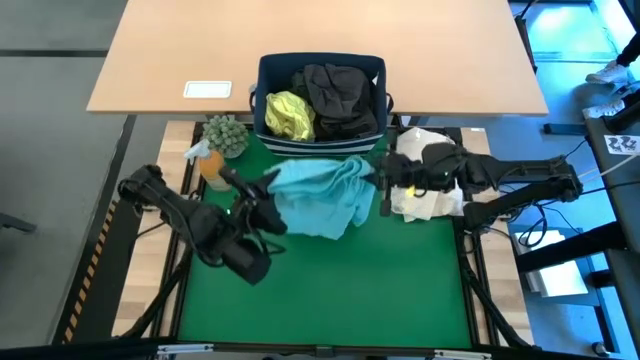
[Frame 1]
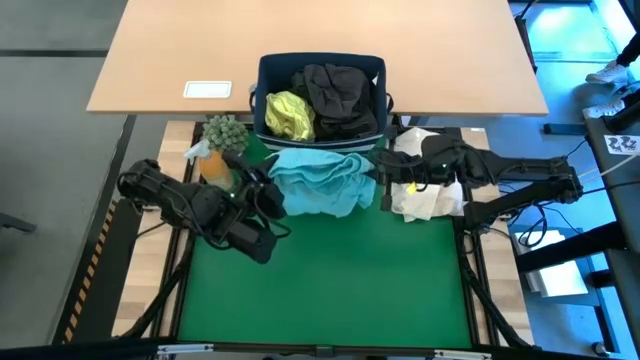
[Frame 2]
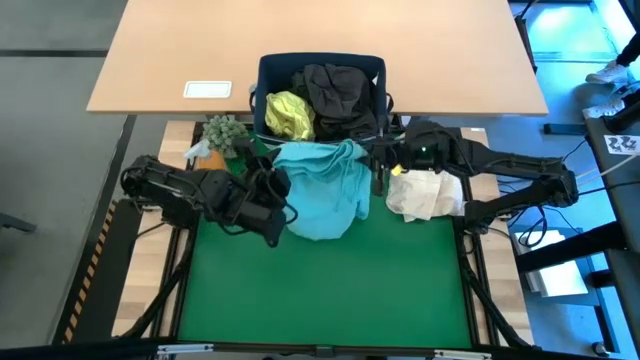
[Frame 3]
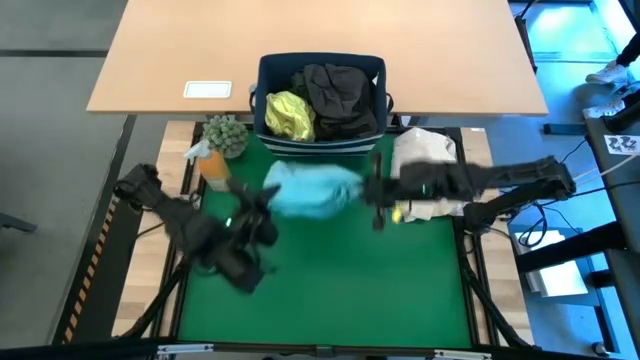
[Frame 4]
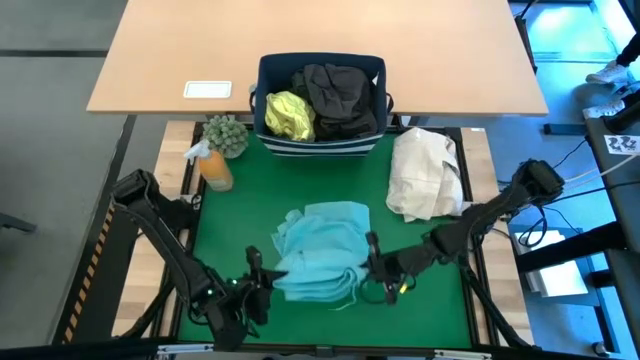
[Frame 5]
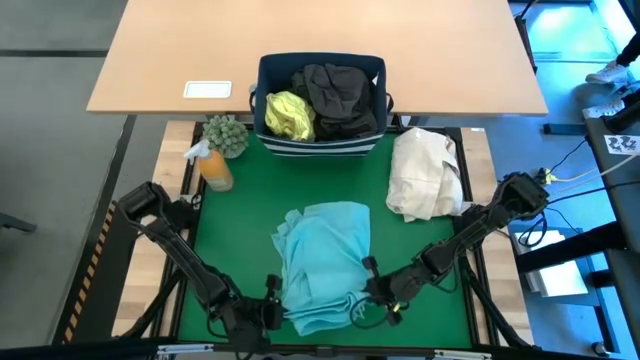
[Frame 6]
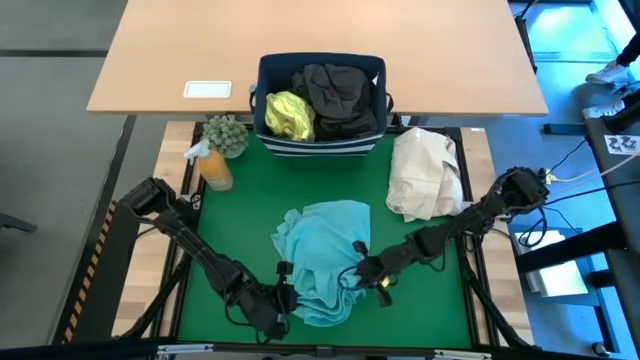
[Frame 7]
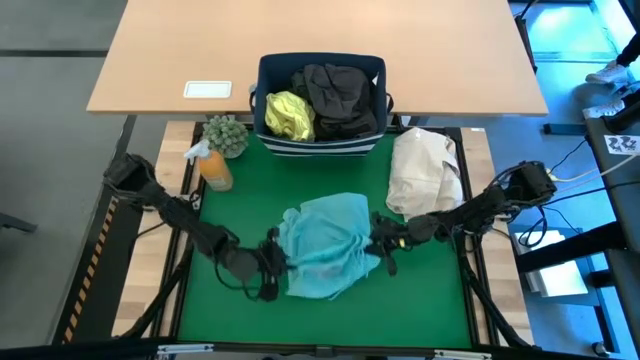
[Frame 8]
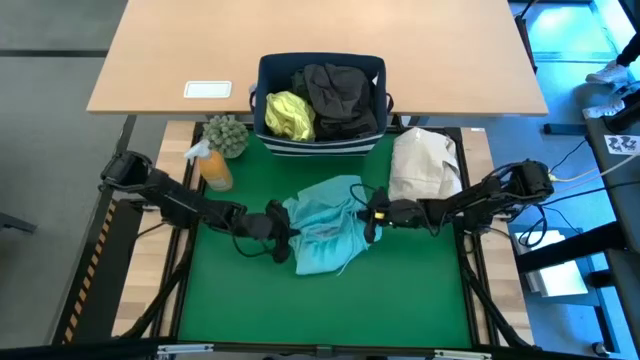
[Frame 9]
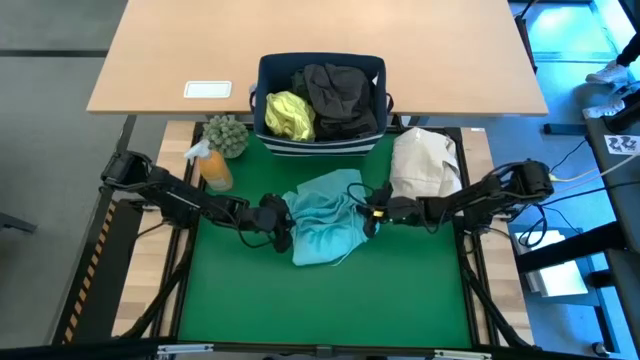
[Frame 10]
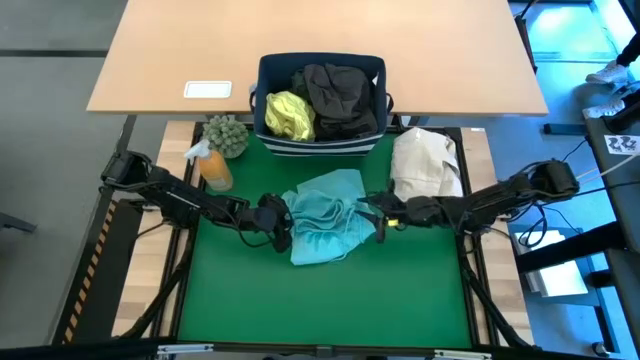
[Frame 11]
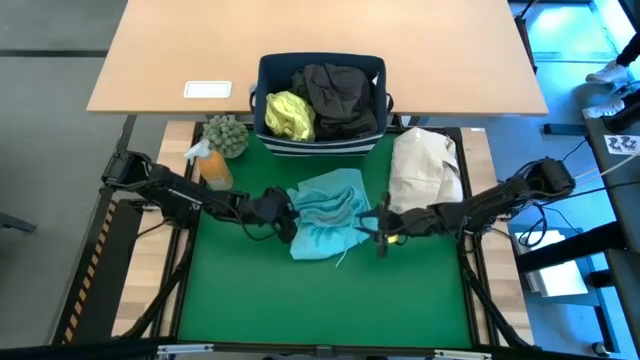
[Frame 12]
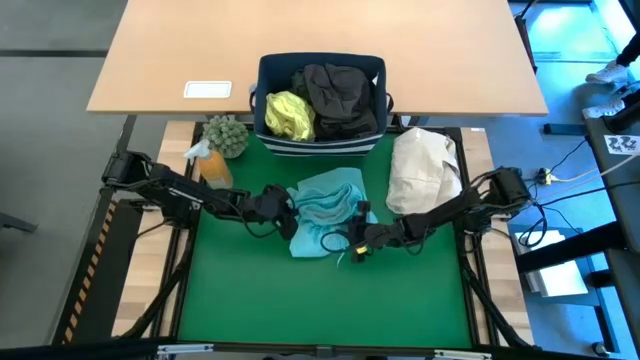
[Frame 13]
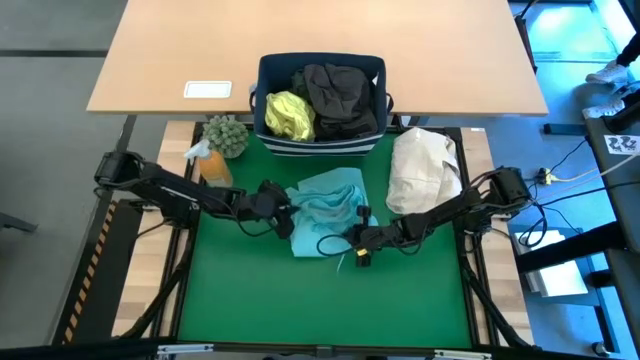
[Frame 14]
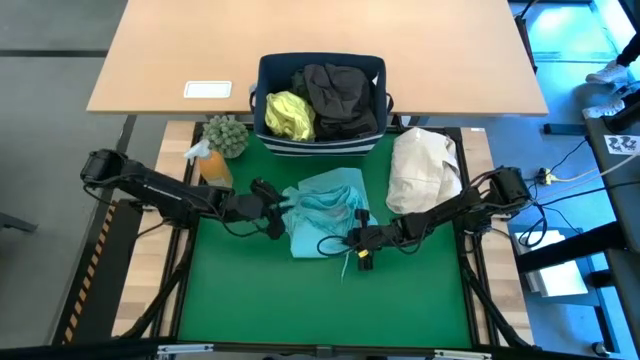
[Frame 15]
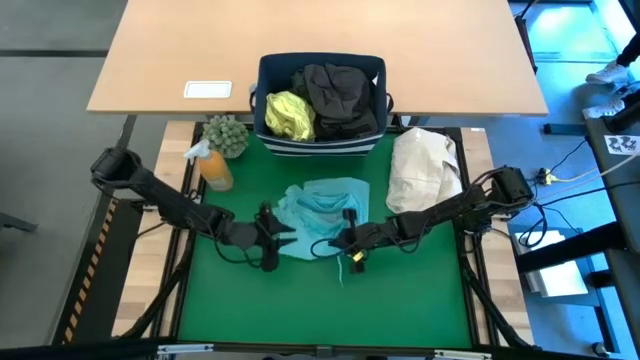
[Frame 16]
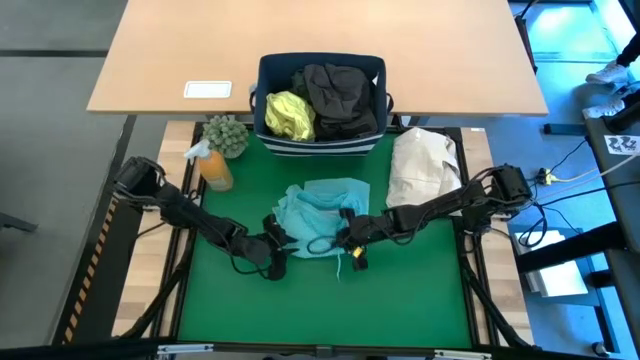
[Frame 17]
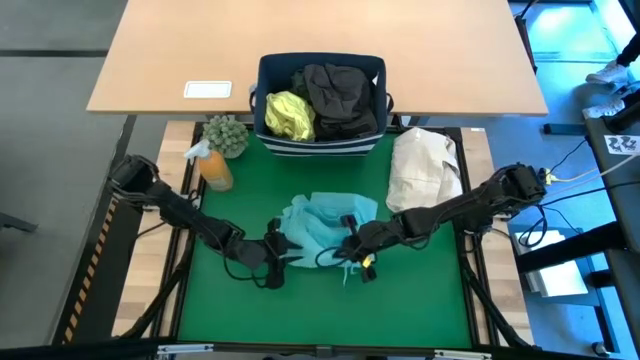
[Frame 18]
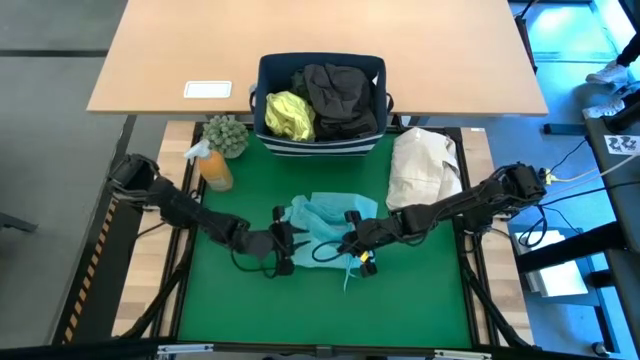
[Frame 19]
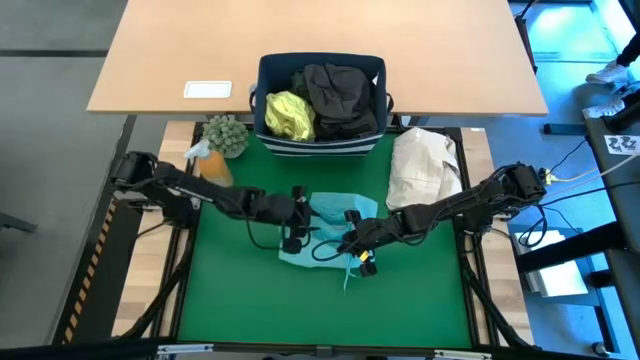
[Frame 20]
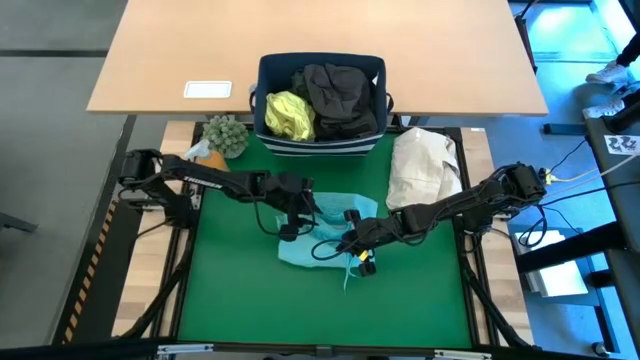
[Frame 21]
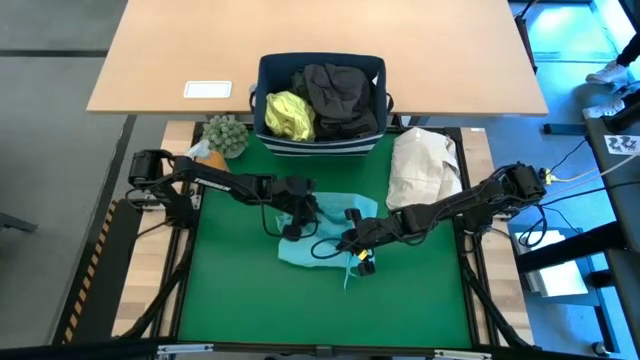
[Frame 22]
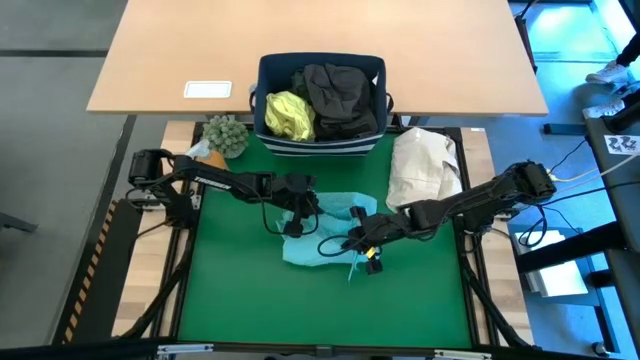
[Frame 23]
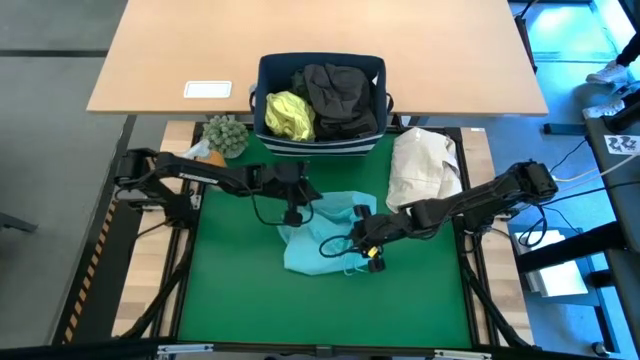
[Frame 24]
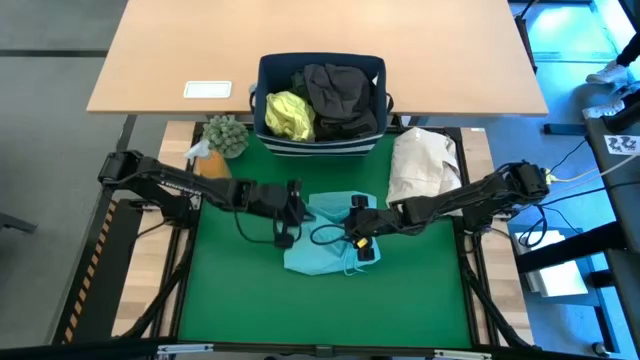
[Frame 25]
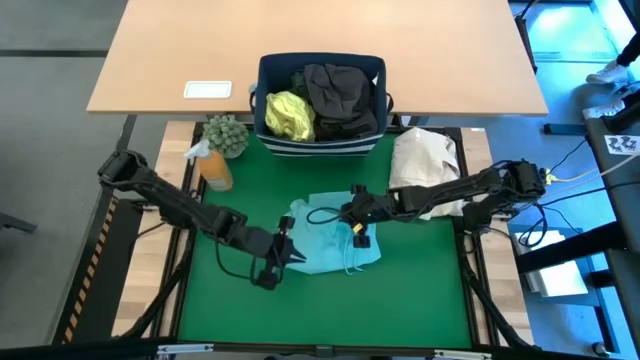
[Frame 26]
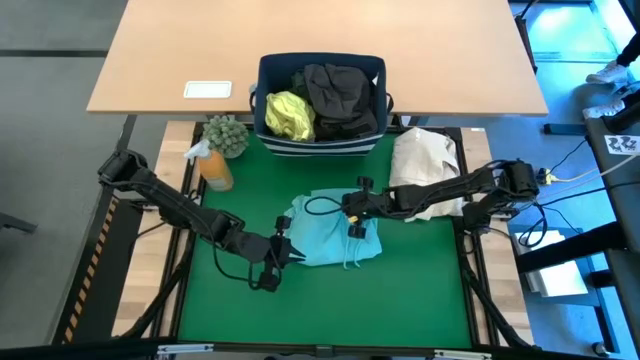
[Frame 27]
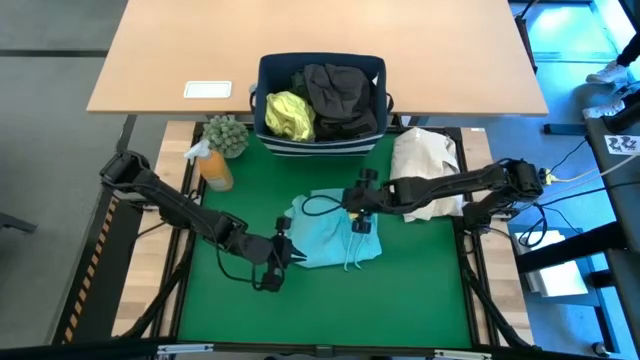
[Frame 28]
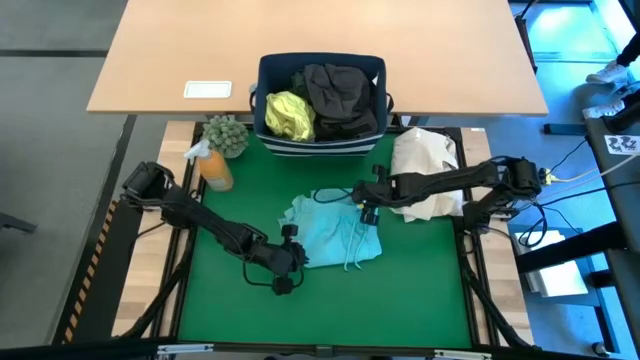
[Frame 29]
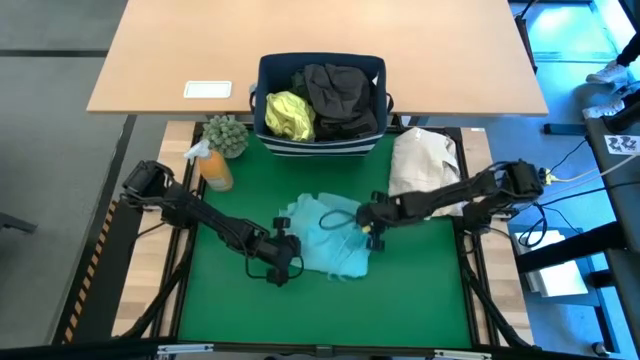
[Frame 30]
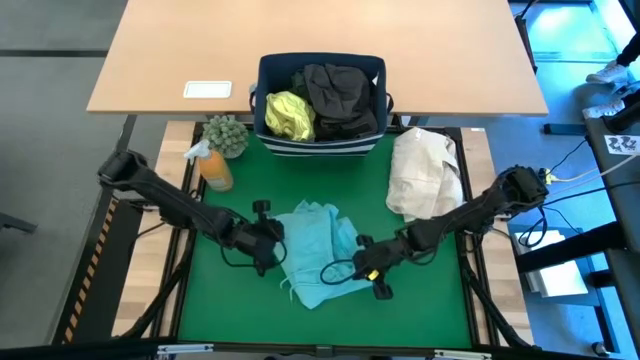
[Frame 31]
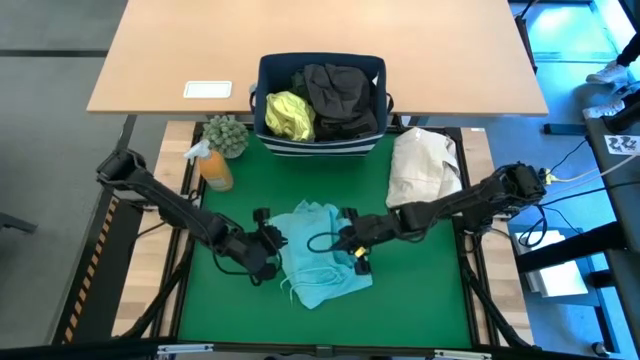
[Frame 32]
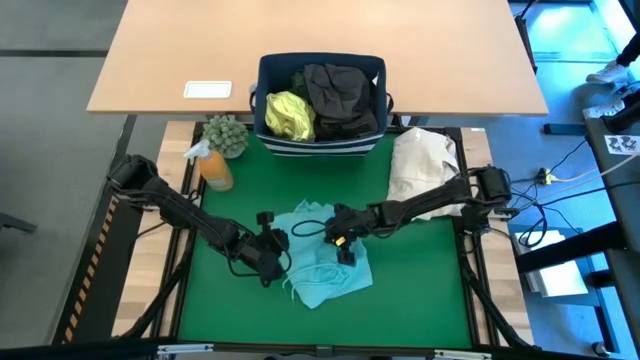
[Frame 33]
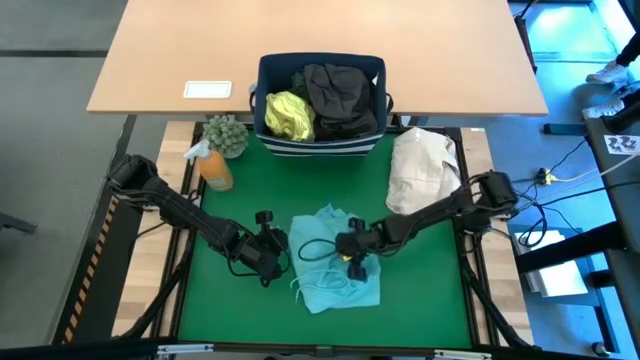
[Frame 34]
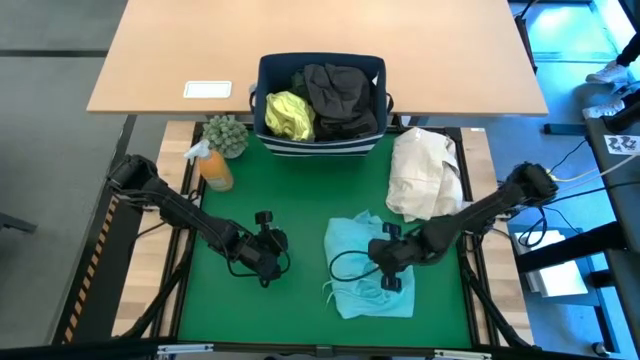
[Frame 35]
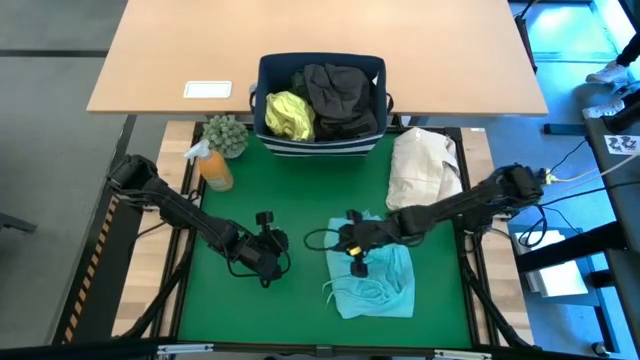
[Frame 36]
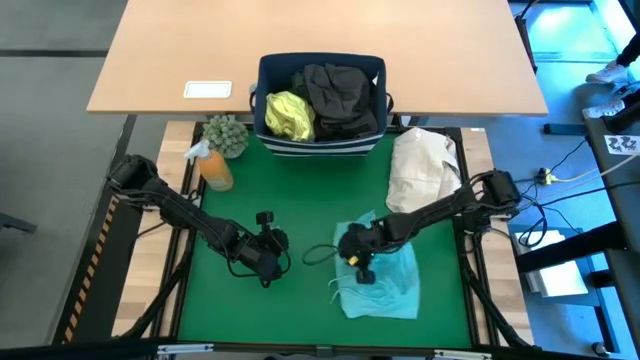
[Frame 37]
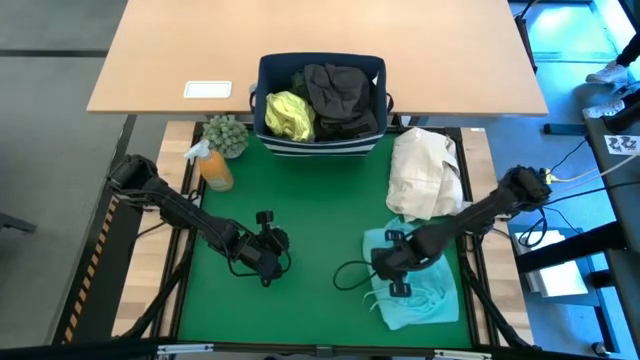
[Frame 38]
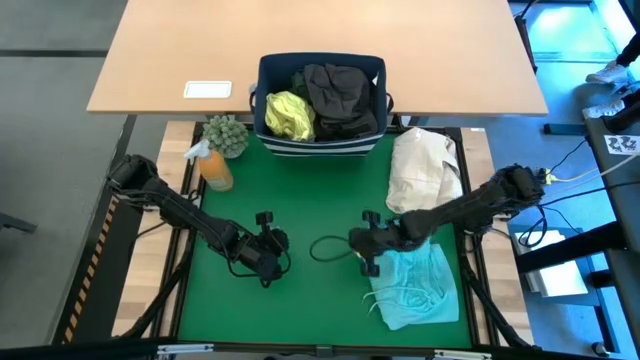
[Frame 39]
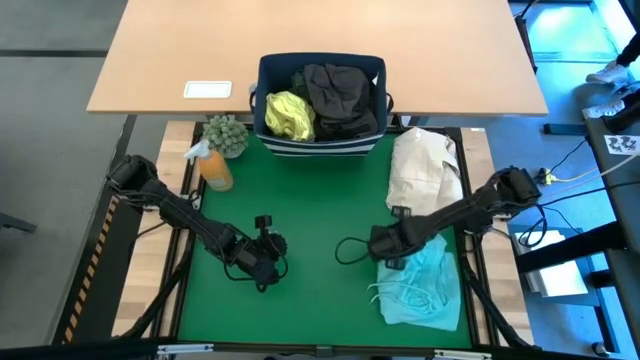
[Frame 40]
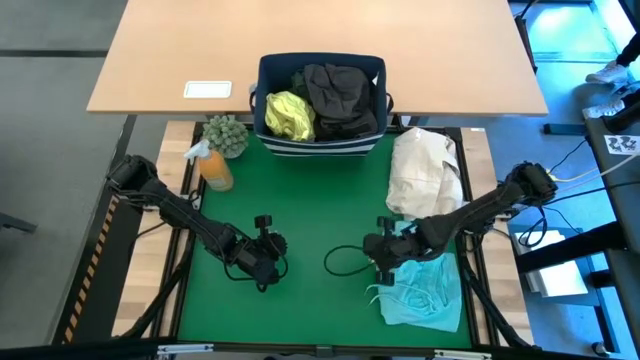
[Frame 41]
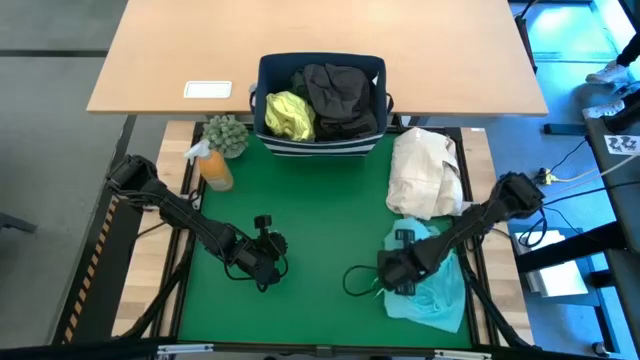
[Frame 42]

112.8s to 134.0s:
Task: Fold laundry
Fold the blue shorts
